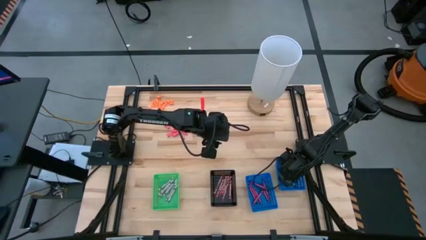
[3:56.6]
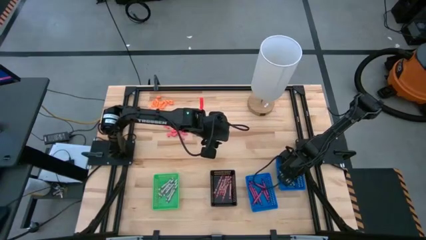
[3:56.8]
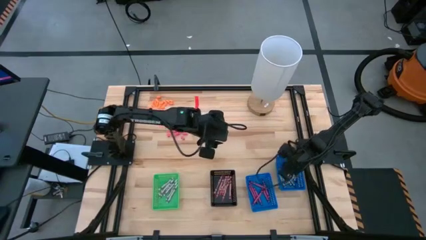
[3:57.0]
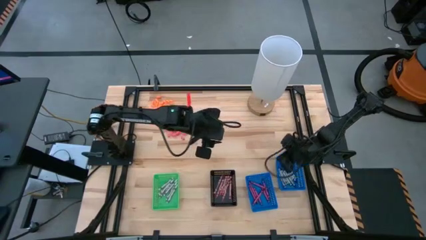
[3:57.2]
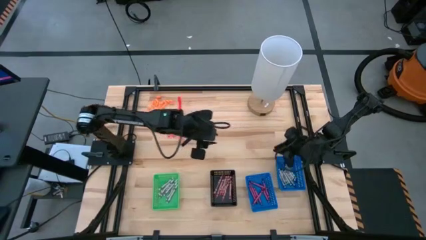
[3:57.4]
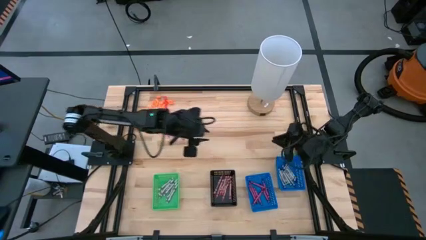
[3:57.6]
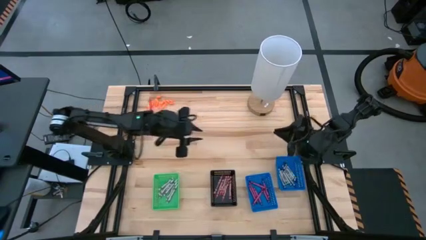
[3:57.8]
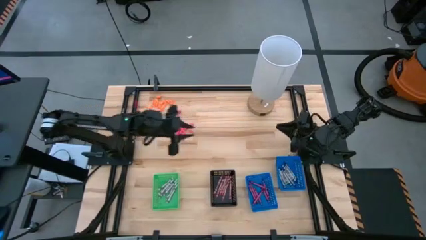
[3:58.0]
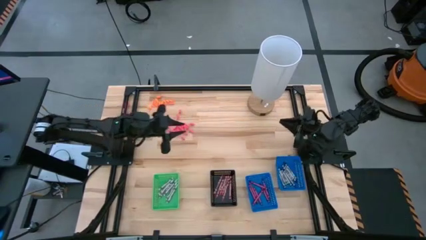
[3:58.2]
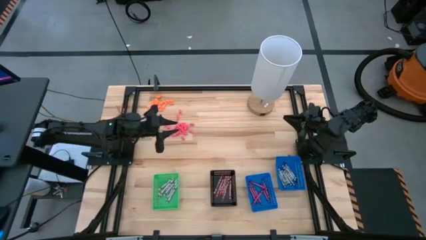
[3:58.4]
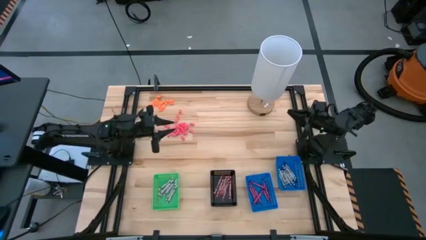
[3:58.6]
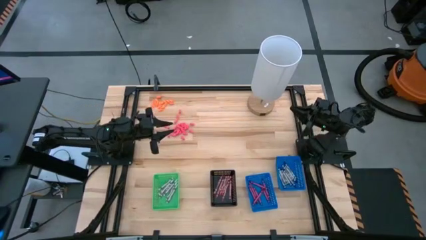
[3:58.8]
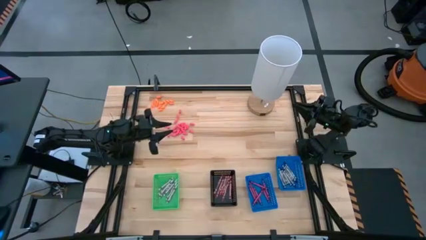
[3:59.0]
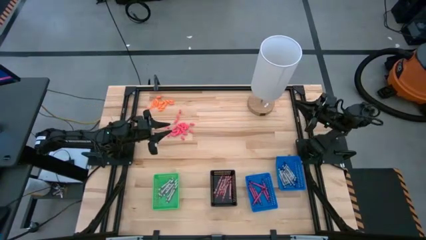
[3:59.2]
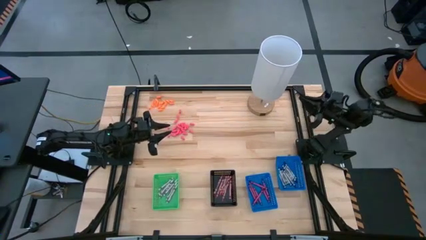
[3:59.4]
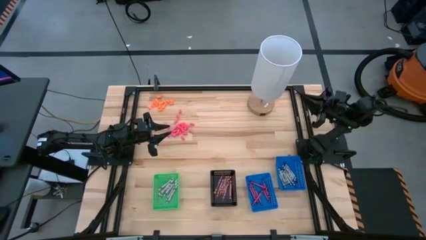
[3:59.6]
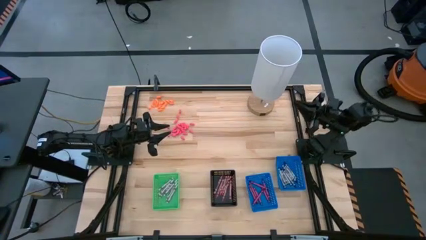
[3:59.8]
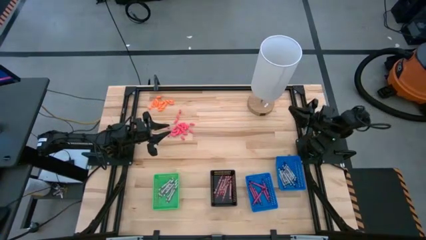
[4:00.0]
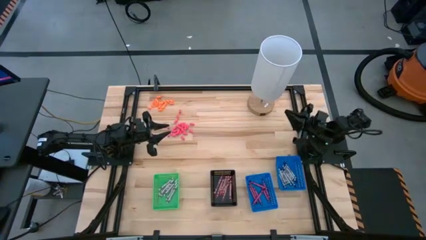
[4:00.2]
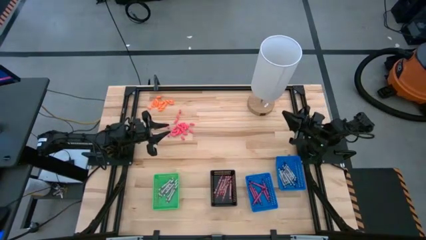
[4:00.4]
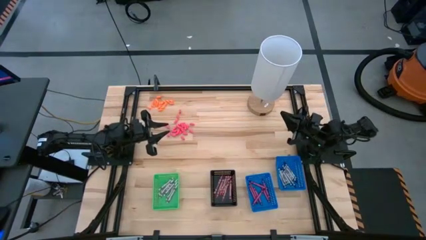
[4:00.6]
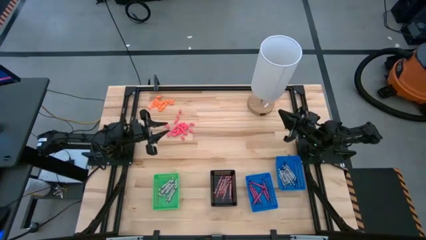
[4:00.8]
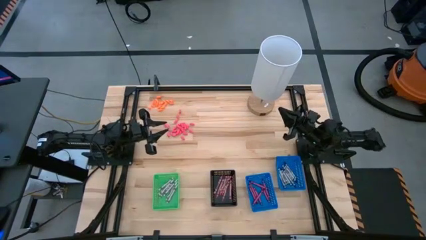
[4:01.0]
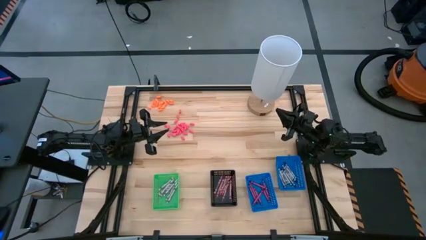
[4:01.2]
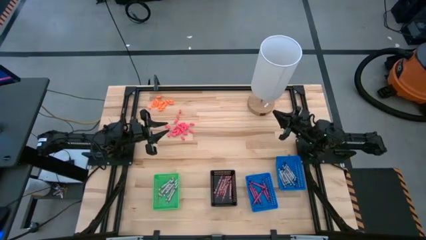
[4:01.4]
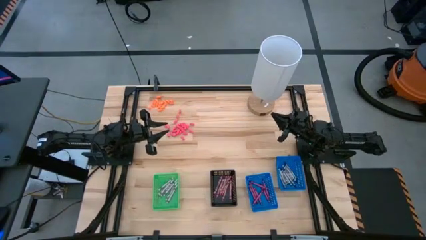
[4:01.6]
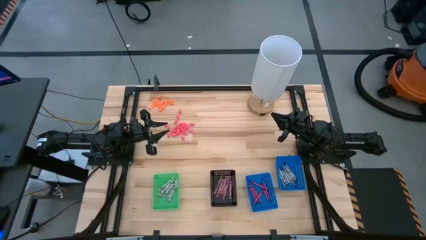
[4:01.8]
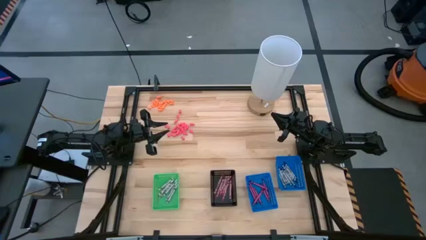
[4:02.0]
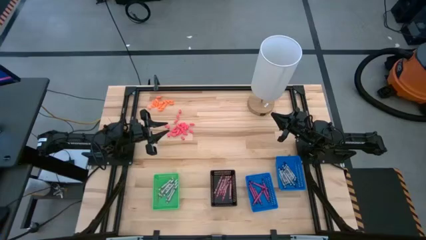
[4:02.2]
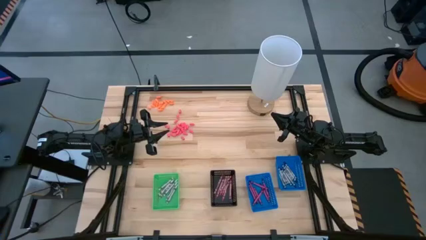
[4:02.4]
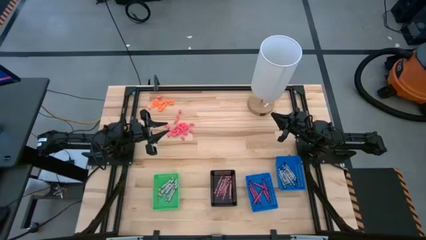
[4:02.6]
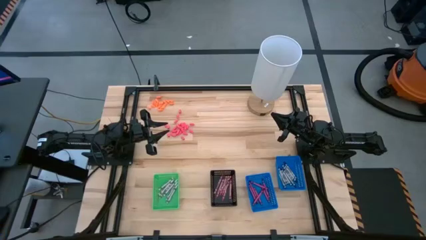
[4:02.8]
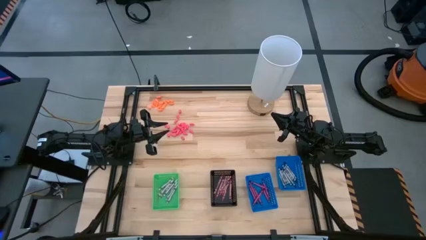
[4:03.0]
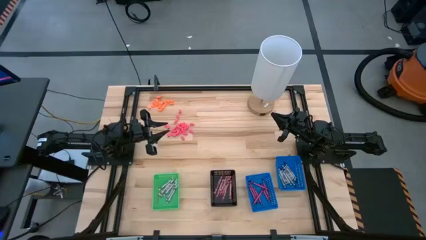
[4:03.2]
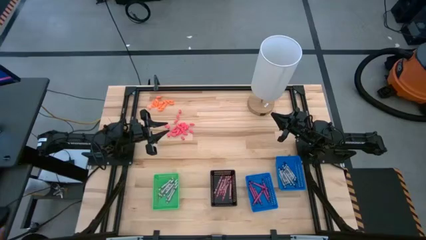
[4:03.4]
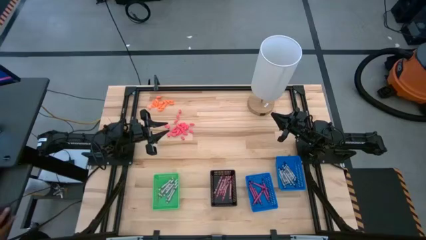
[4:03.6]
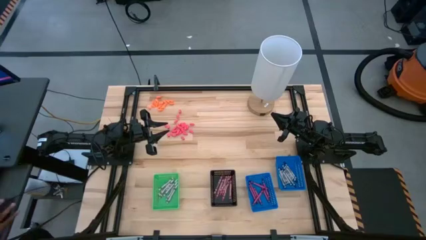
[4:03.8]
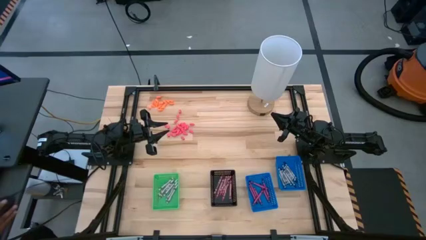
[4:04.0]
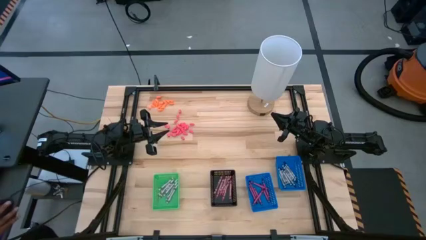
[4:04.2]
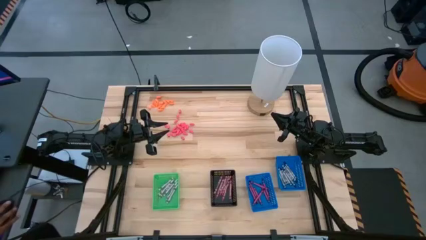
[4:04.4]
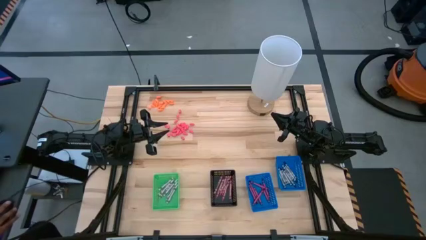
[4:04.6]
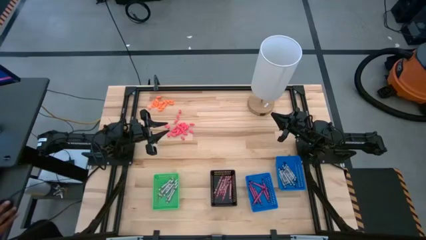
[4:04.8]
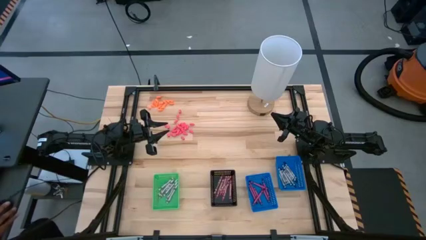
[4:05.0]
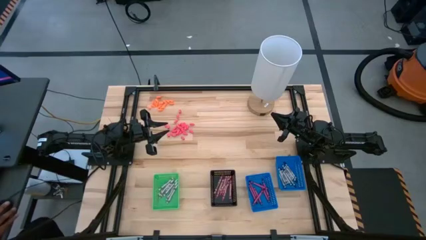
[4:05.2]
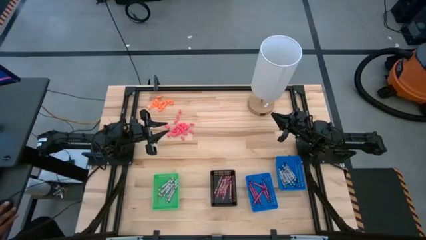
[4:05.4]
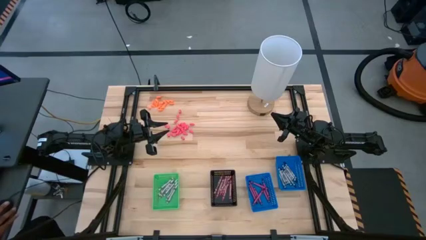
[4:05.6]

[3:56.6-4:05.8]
Task: Sort crayons
Return to Home Position

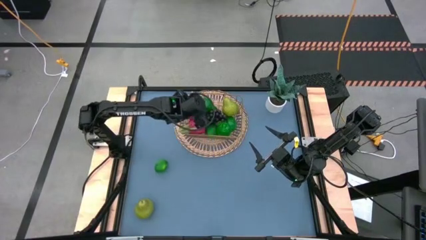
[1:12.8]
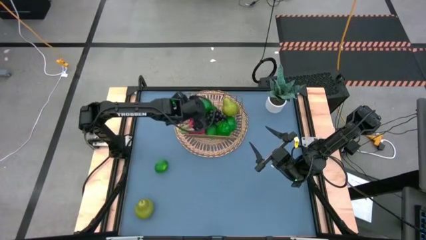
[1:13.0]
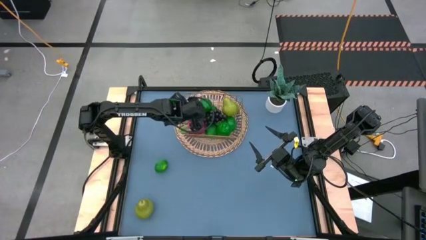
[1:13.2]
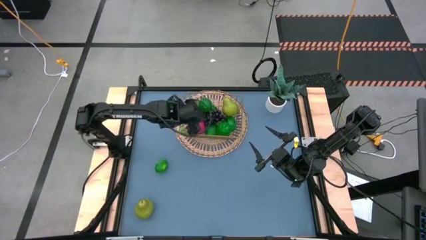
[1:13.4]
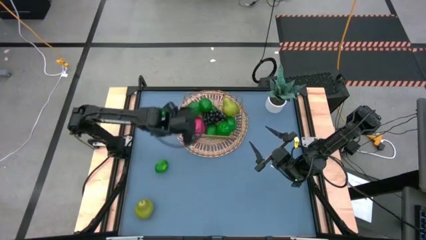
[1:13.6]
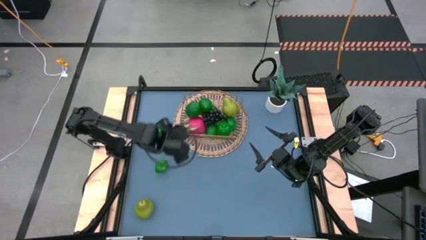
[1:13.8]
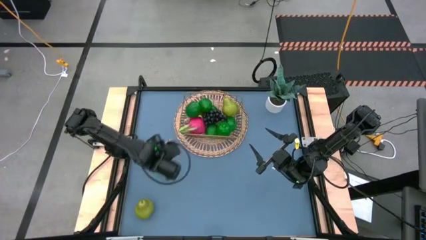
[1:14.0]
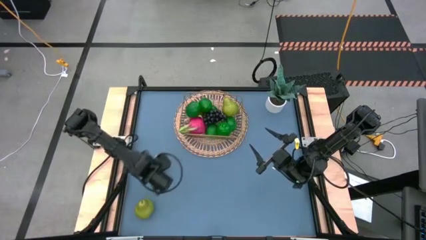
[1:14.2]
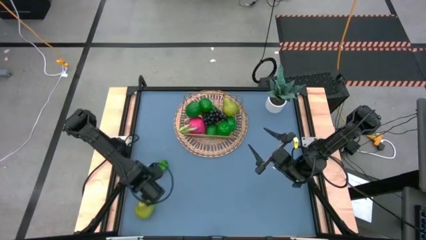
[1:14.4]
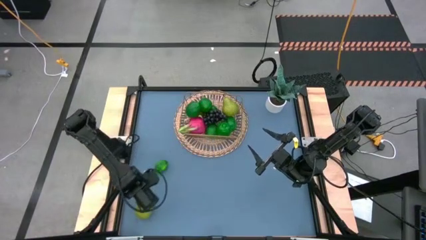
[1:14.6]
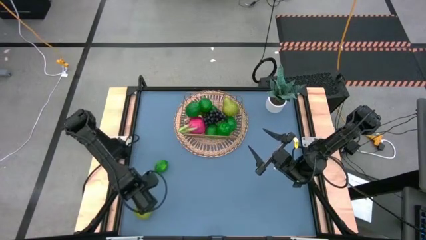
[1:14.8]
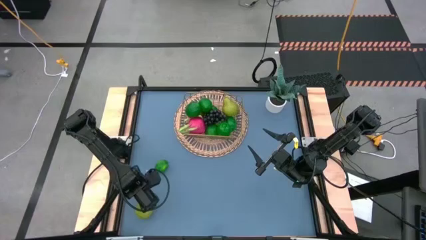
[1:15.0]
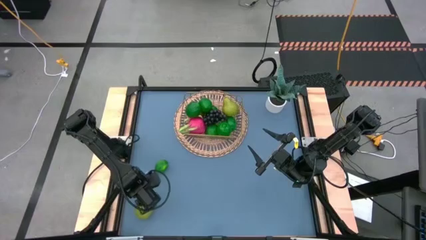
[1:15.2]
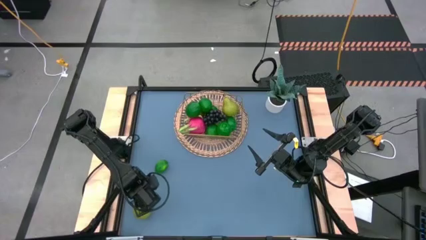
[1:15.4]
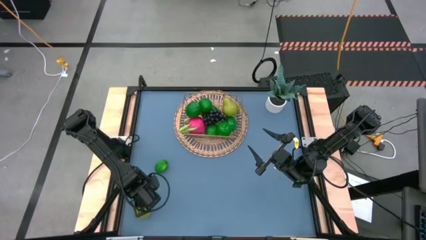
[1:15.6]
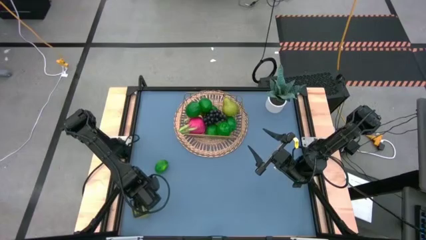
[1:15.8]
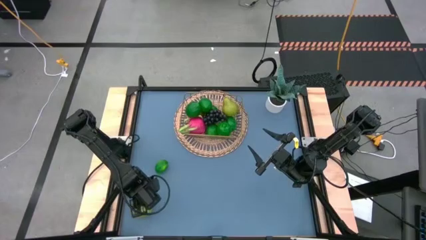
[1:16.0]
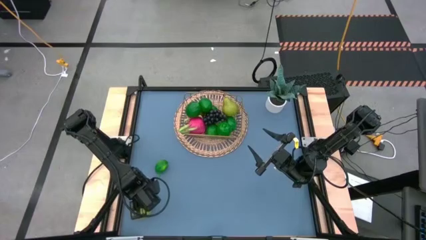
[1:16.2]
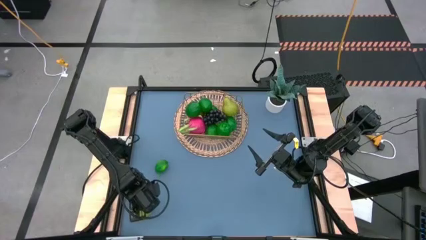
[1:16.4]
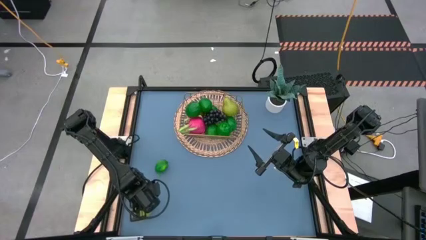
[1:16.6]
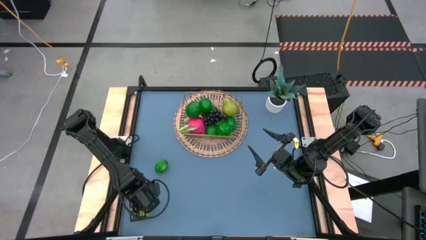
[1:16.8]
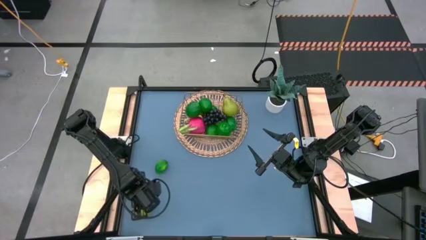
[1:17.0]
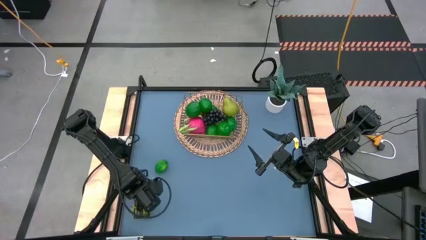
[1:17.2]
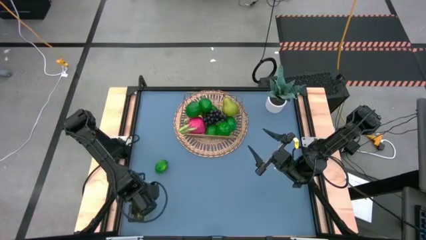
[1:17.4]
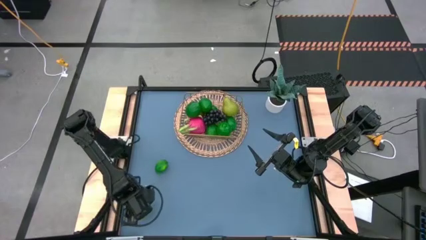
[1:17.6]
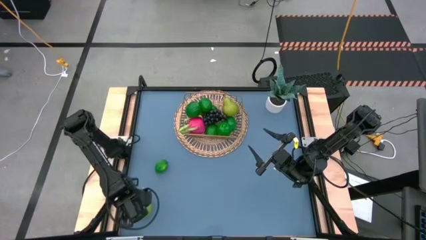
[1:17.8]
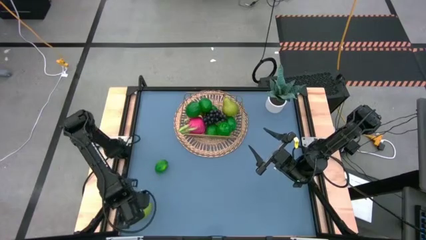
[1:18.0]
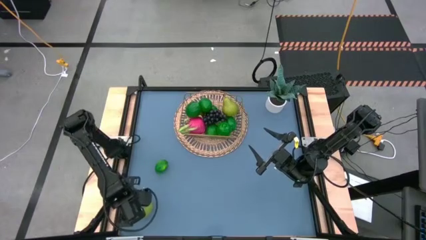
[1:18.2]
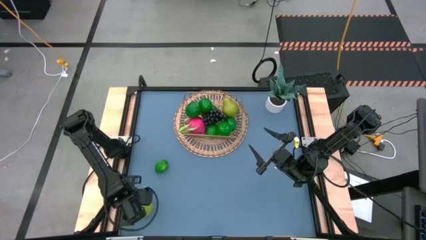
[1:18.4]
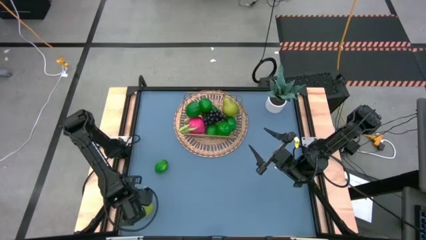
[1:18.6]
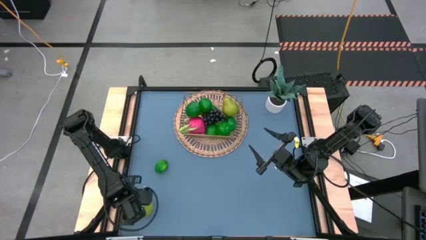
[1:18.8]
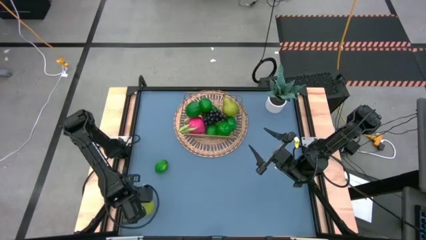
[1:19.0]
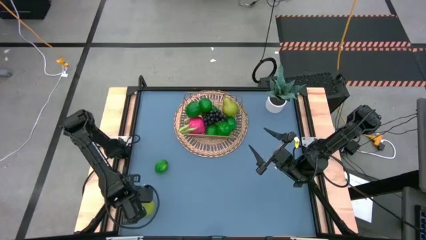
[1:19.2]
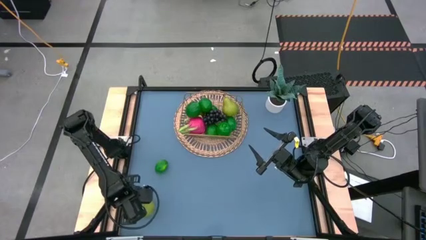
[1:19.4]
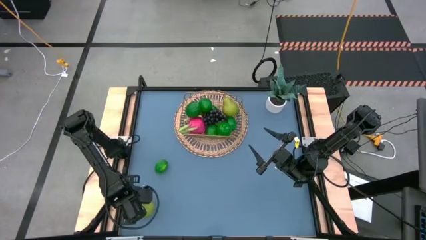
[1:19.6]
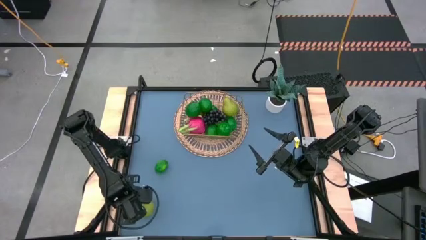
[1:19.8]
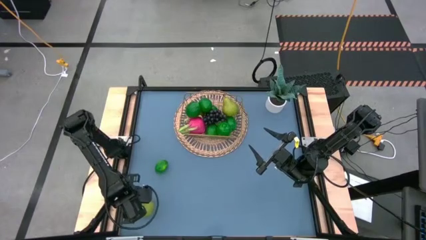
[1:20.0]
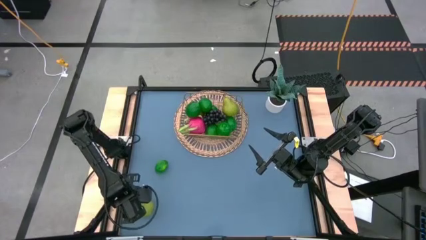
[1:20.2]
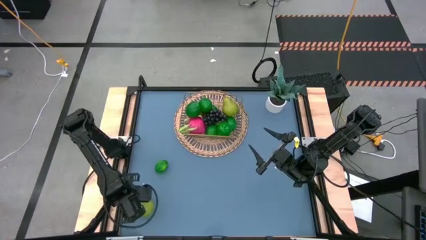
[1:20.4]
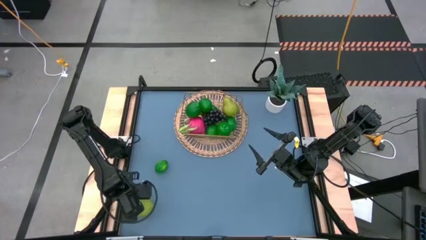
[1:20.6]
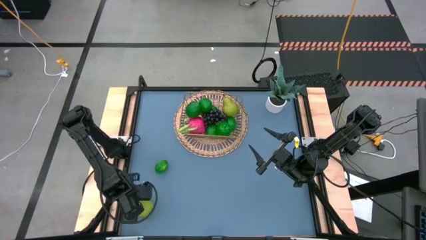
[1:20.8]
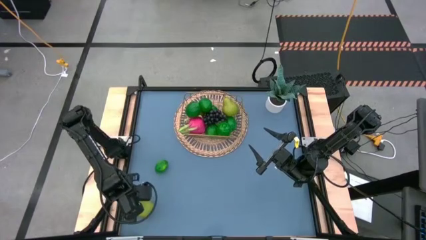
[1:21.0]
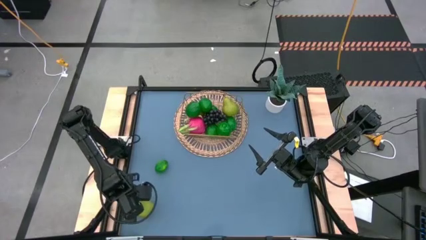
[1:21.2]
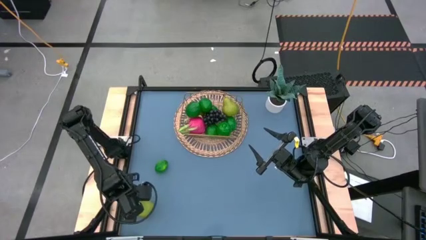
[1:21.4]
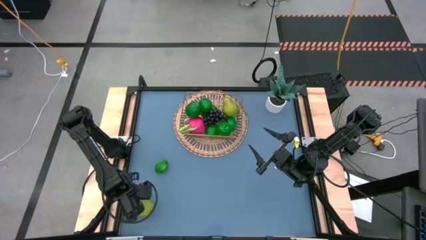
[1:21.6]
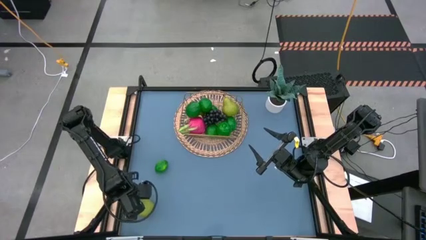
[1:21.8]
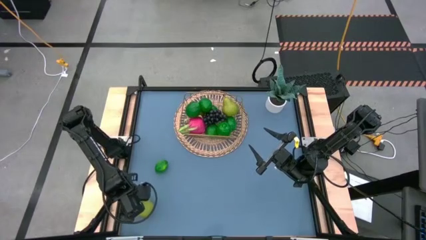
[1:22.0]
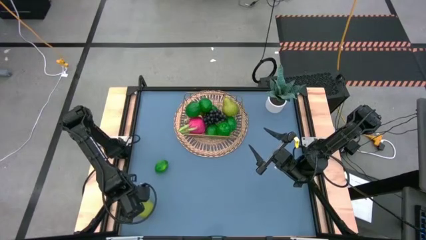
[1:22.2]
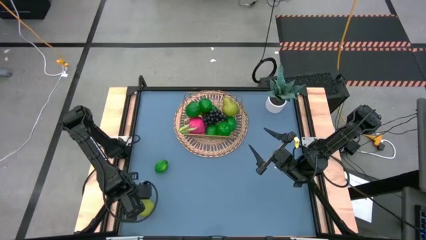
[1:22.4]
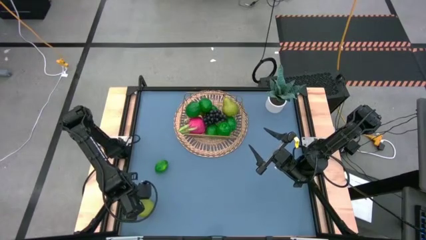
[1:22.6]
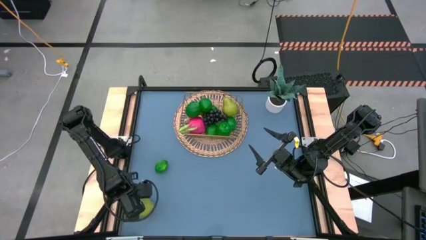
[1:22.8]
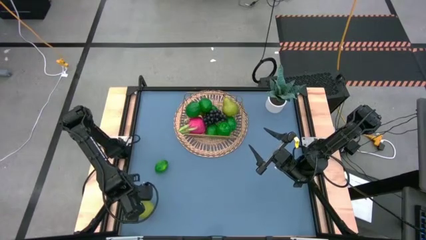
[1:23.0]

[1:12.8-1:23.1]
Task: Build produce basket
Put the green pear into the gold wire basket
